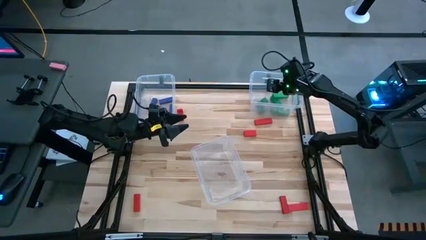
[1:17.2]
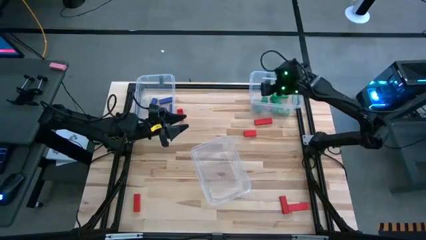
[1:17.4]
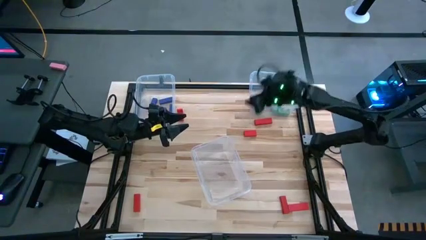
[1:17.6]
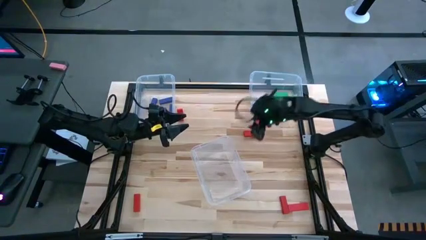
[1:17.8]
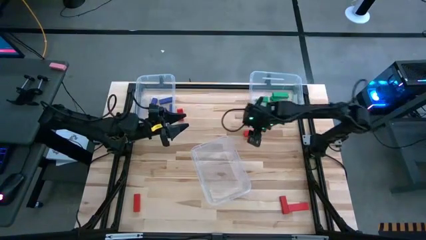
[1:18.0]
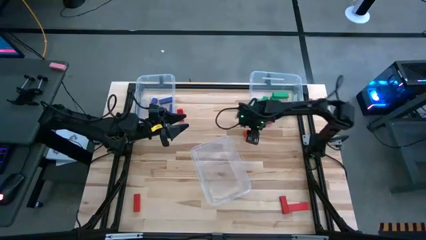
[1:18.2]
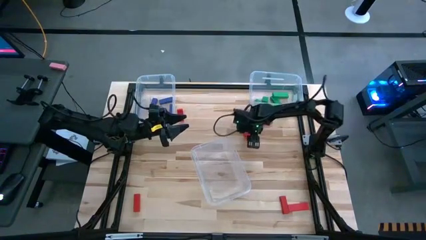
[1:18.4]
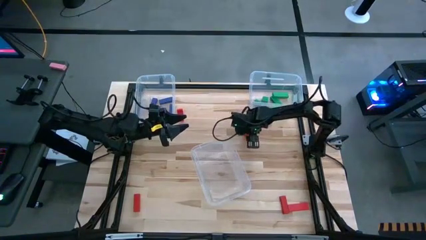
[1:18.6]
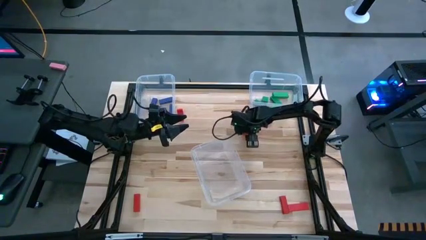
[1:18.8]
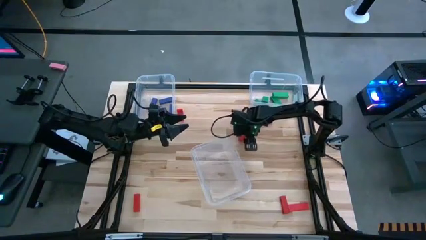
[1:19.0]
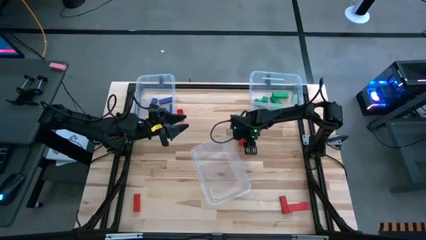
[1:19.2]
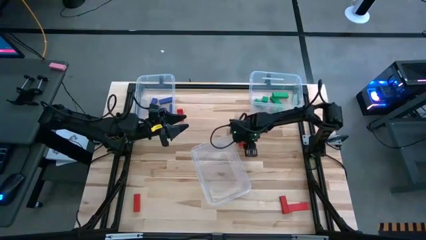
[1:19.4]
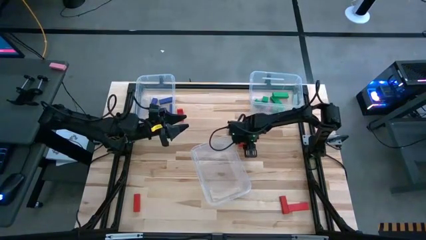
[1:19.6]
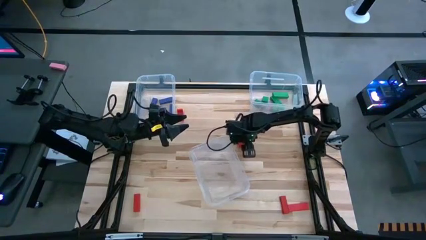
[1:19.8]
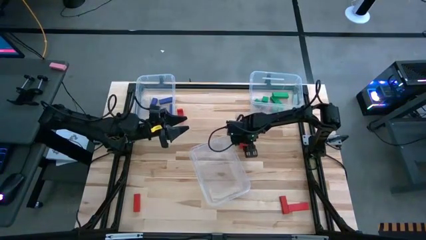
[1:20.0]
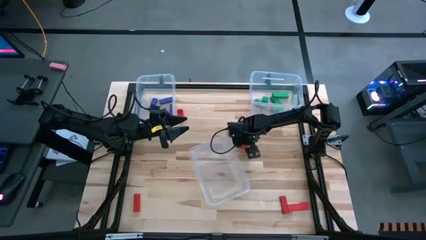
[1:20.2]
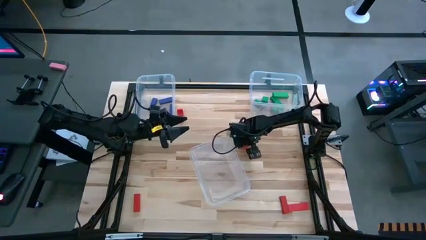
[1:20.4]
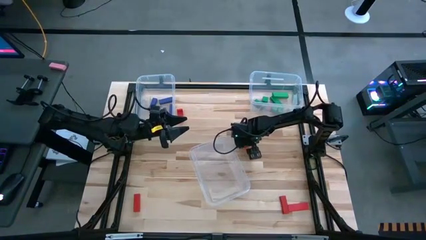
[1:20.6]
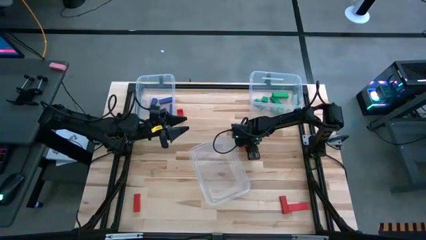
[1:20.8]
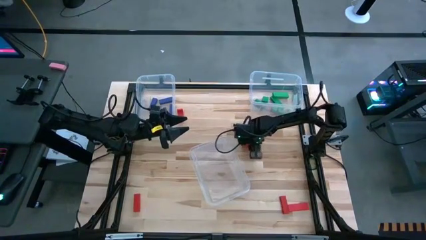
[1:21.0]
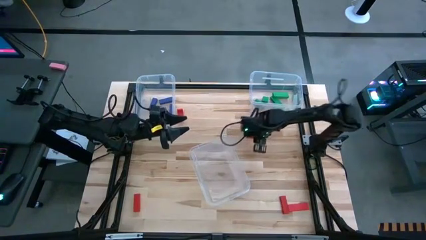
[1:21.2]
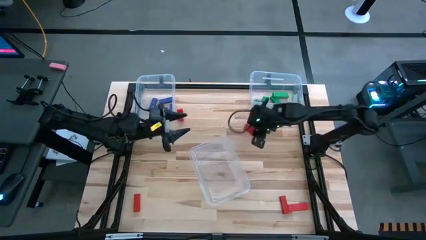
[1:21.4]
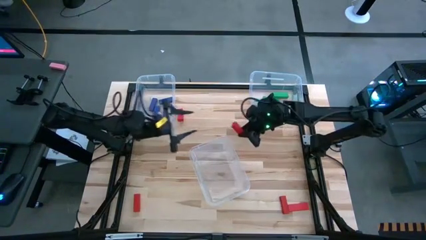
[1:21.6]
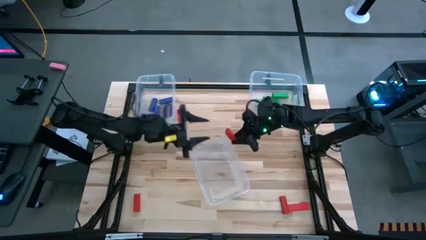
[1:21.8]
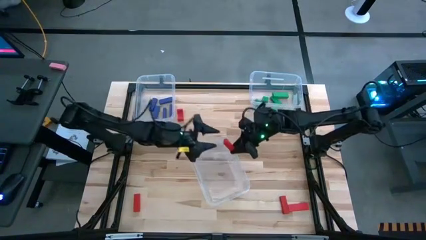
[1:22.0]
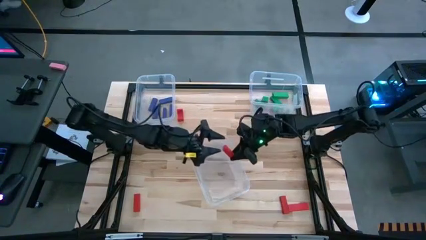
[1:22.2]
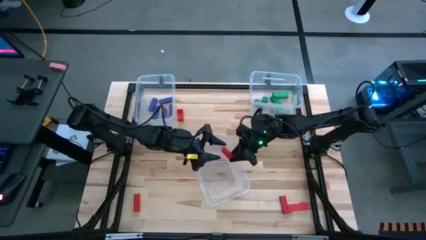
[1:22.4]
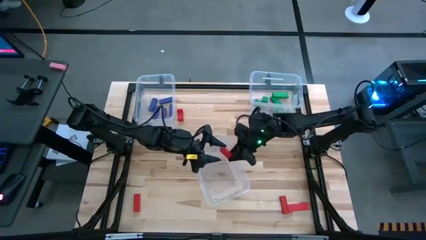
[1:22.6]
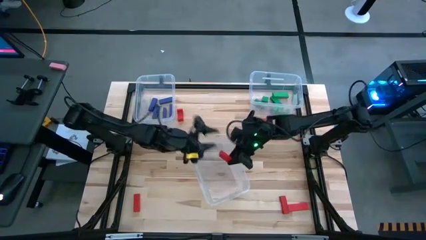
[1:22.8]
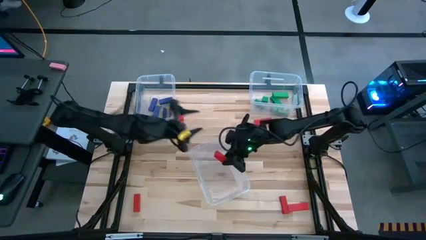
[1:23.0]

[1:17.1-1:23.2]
Task: Sort blocks
Put the red block into the bottom transparent bin

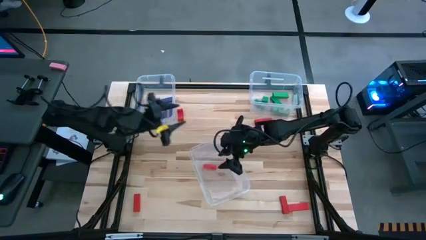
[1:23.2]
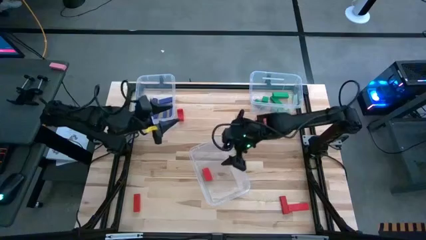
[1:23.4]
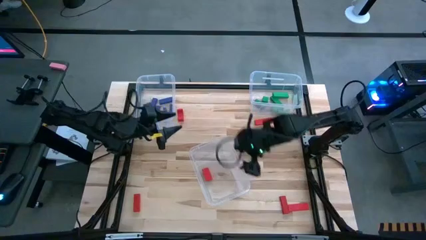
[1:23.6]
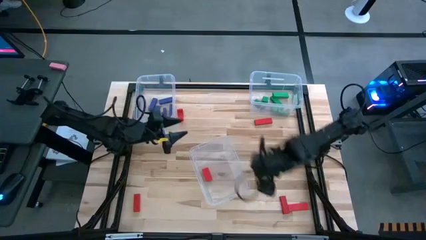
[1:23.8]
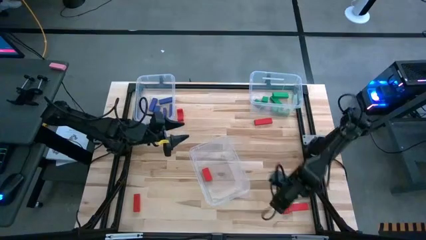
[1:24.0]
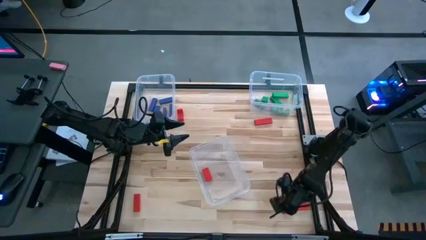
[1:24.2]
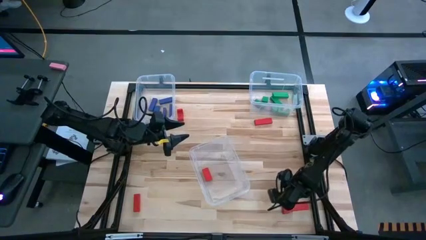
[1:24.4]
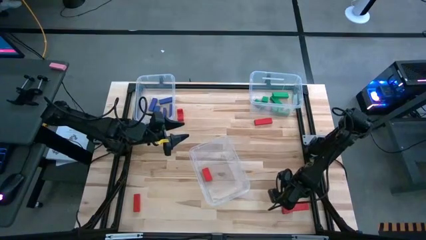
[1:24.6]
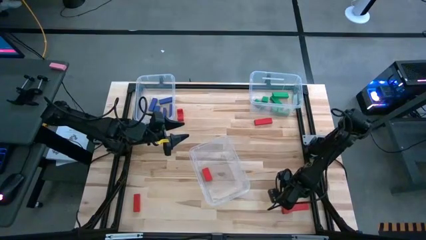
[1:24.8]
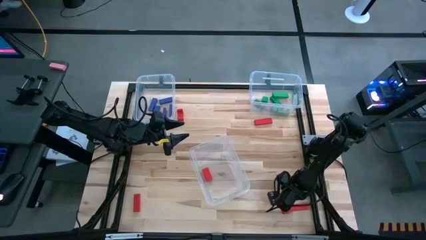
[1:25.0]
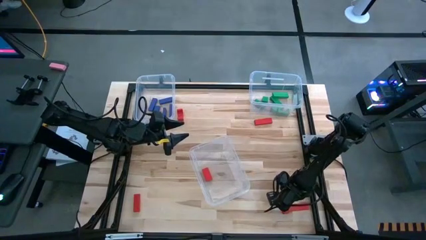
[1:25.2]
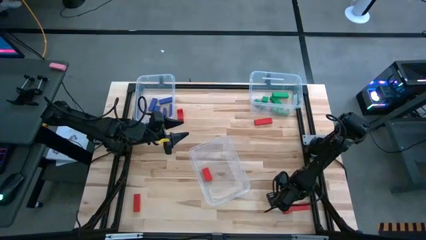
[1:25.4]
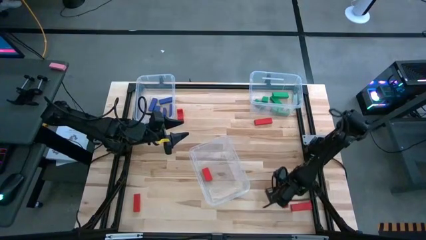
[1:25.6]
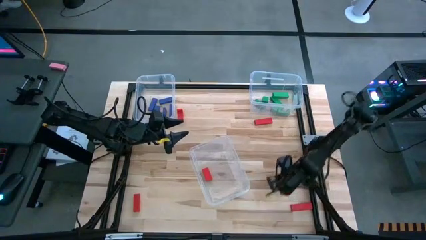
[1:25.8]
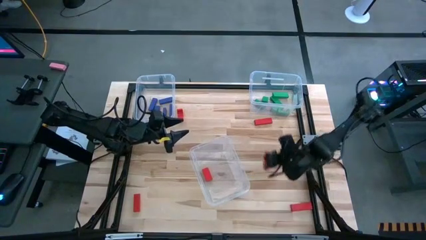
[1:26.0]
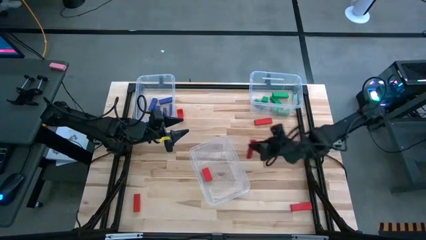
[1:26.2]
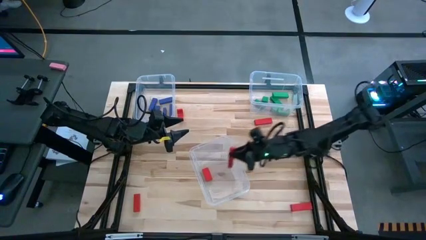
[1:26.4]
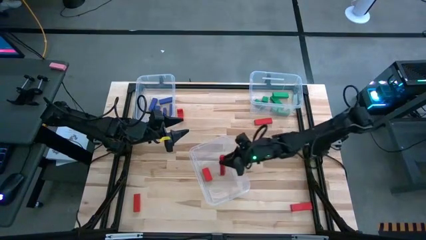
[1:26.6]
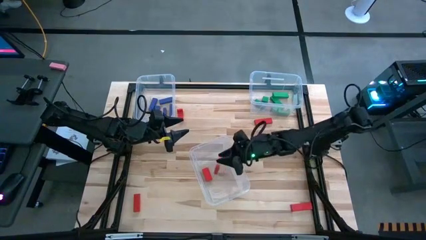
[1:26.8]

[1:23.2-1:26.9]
Put the red block into the bottom transparent bin

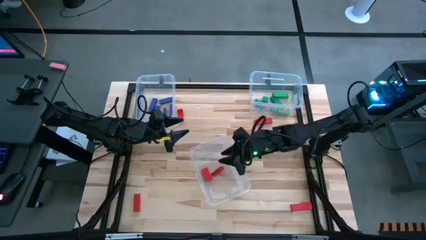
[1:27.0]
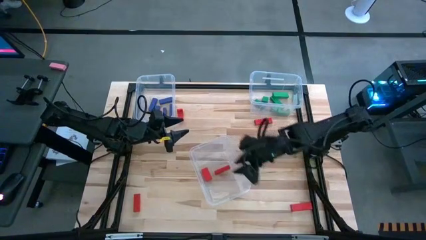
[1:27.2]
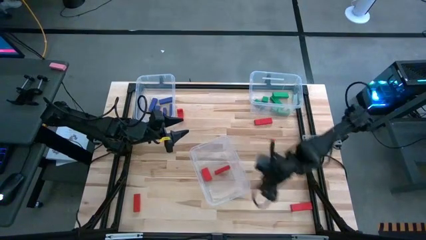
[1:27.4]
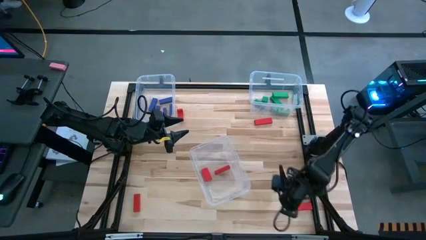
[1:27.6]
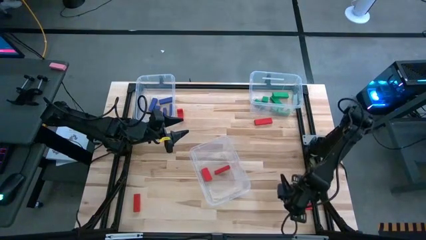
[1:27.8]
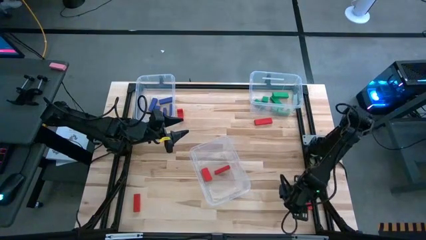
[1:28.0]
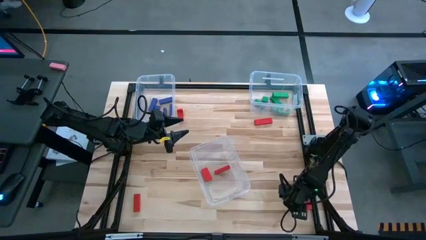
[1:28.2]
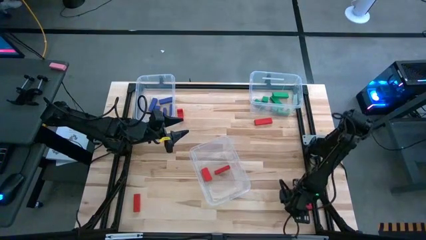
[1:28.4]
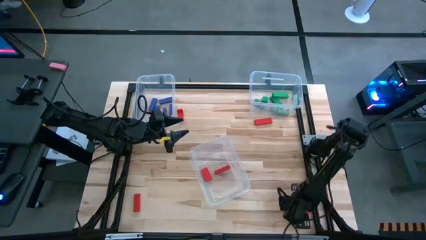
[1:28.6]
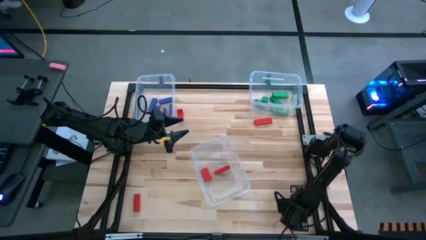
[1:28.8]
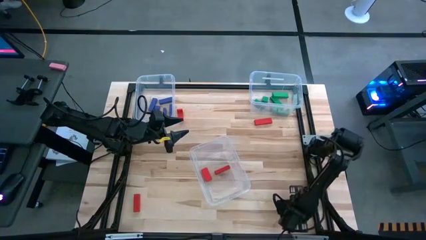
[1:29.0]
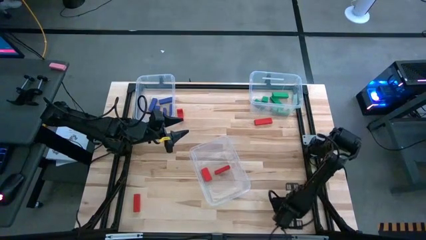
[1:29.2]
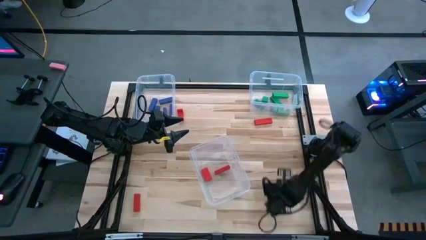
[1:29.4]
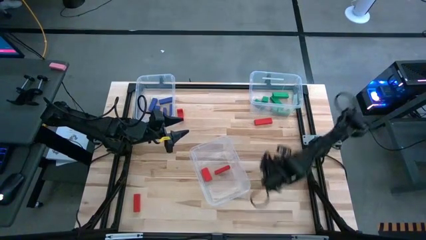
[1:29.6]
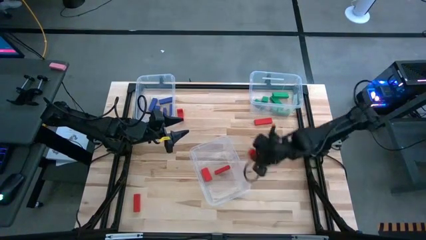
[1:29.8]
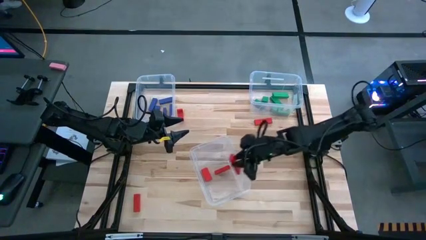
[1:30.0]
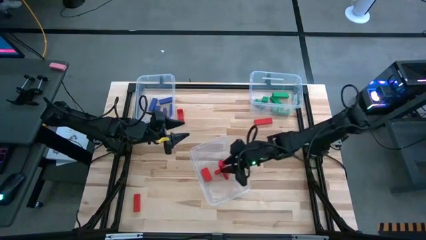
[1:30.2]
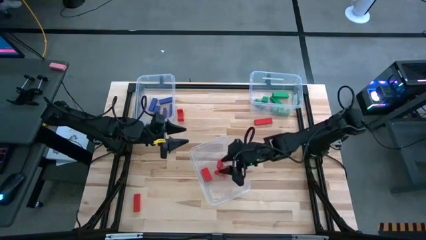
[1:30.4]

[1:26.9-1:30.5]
Put the red block into the bottom transparent bin

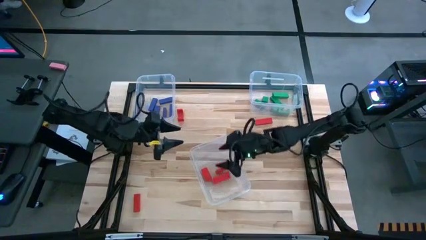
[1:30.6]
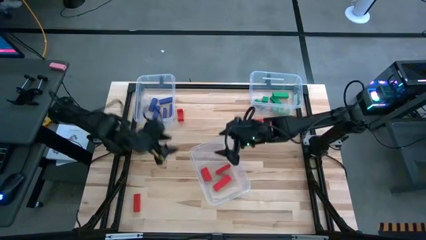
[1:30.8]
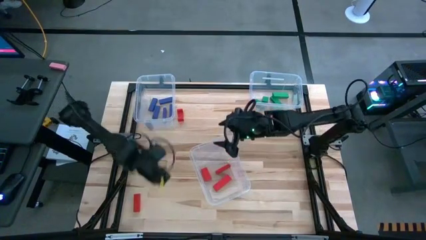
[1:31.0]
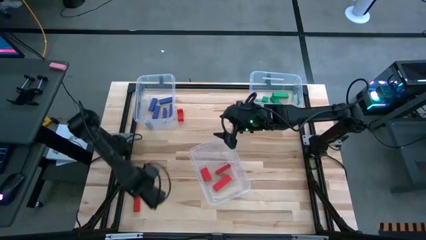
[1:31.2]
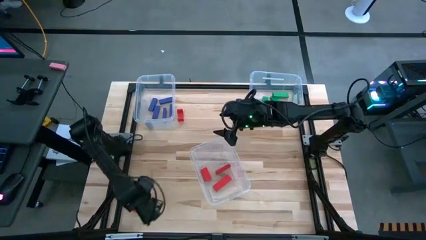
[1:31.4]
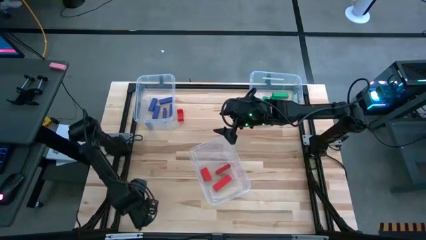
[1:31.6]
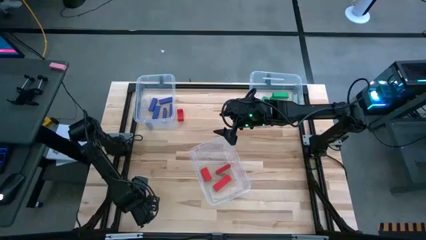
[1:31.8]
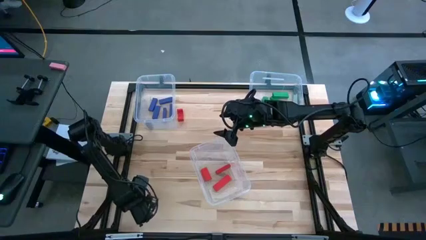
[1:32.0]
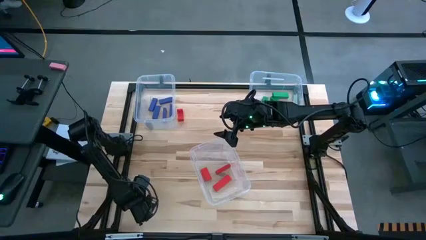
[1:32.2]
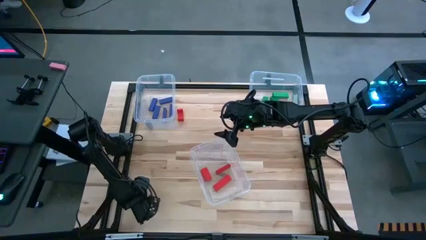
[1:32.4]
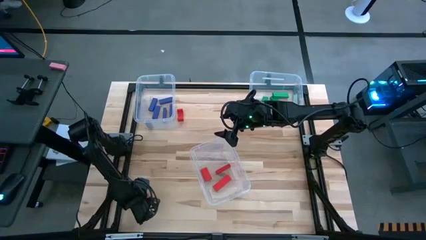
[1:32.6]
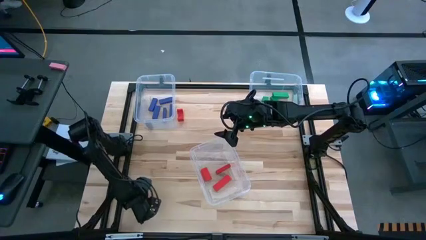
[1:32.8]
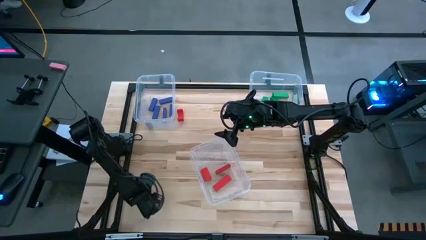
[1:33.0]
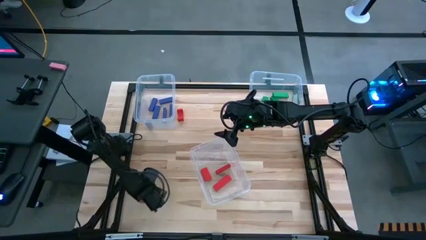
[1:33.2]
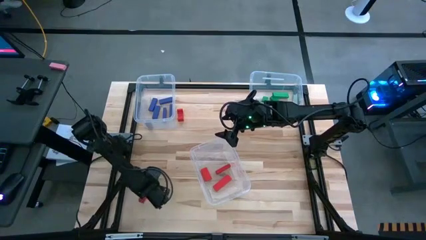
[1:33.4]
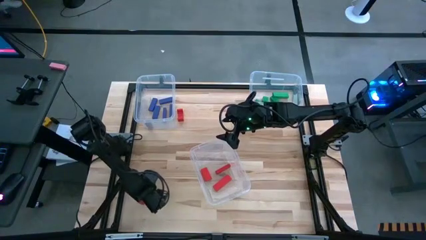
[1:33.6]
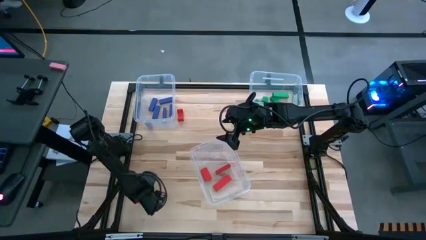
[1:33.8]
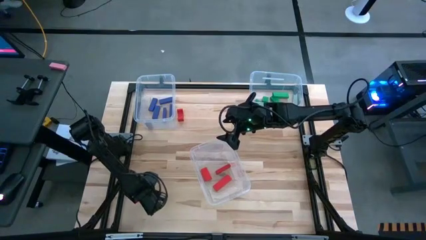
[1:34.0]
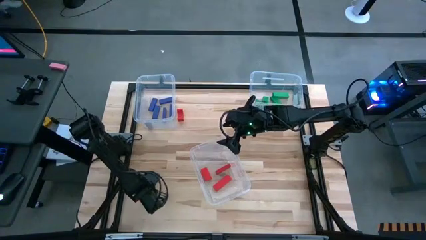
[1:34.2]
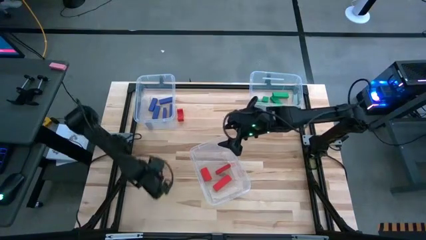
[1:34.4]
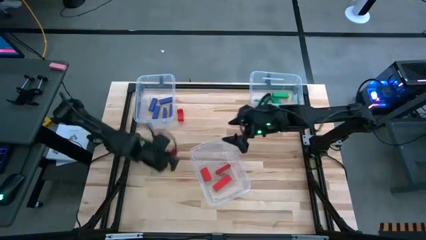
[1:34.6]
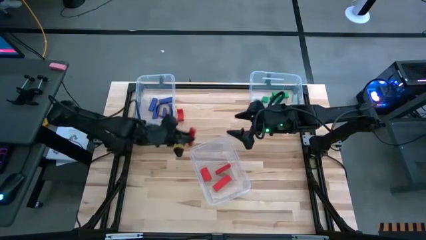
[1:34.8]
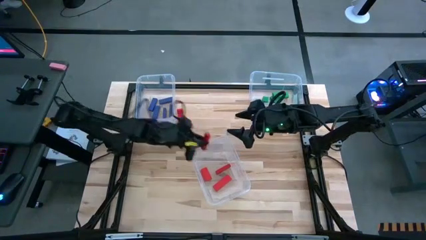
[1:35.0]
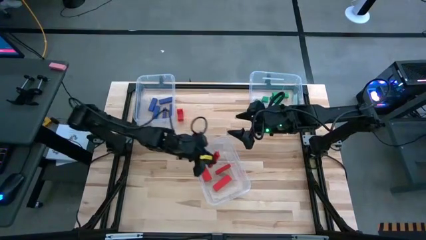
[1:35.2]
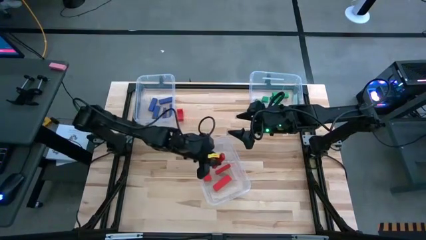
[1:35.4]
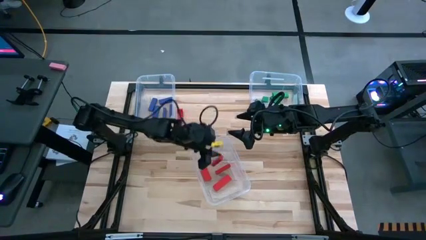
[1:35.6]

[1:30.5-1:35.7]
Put the red block into the bottom transparent bin
